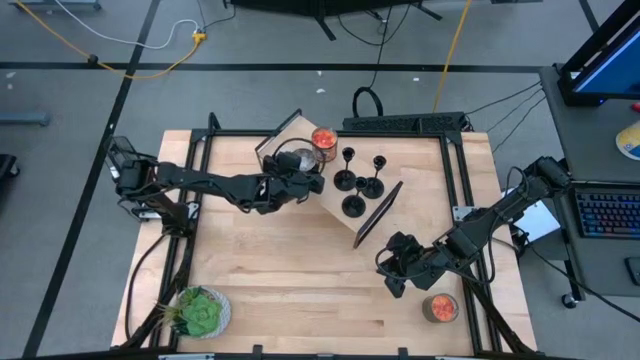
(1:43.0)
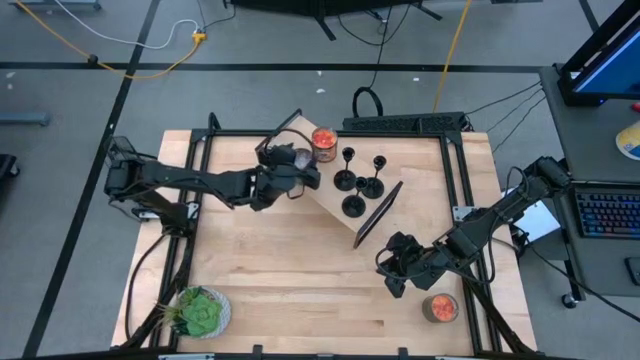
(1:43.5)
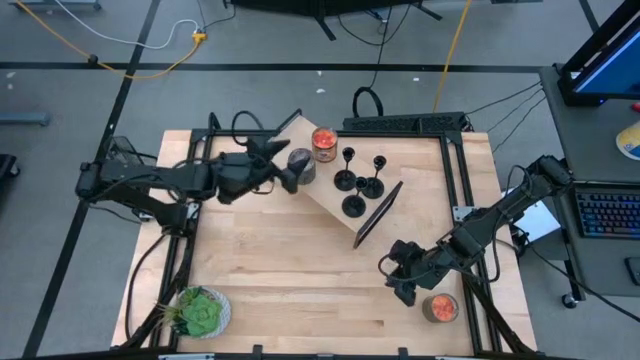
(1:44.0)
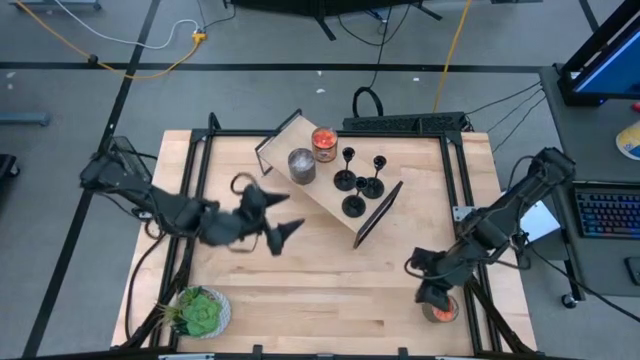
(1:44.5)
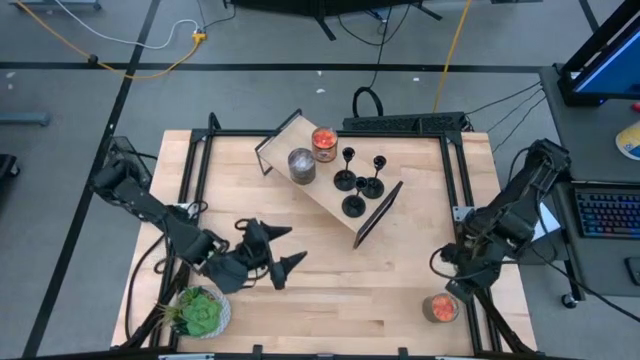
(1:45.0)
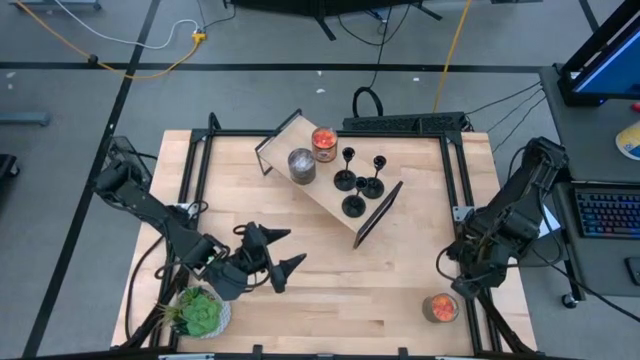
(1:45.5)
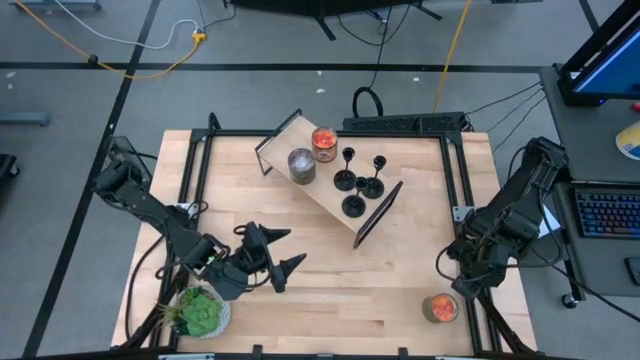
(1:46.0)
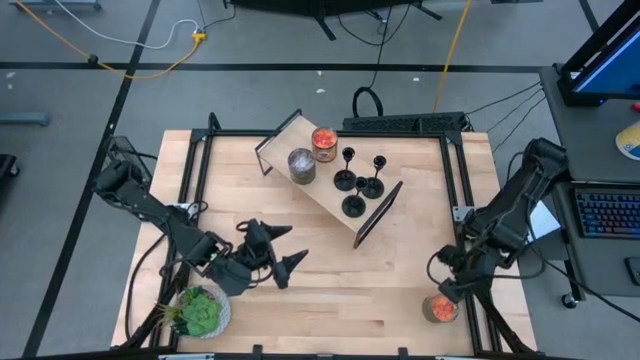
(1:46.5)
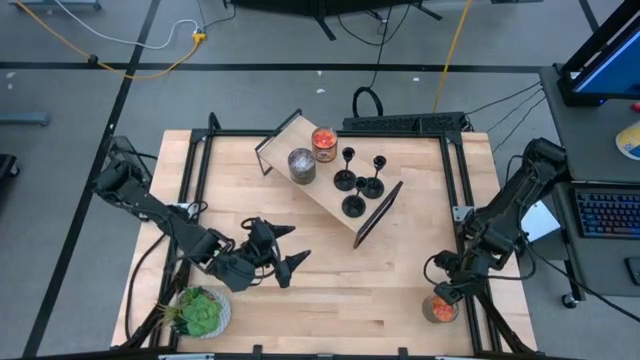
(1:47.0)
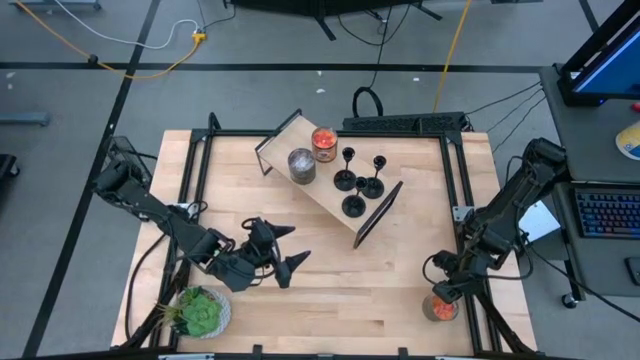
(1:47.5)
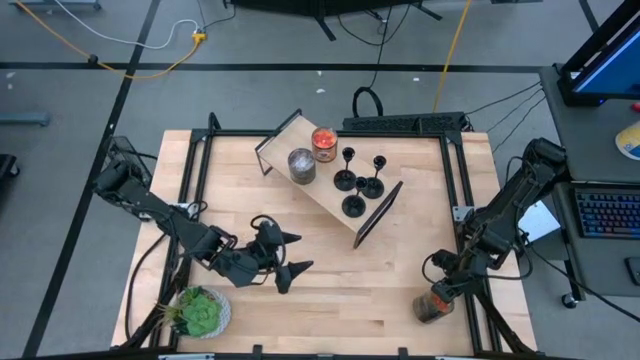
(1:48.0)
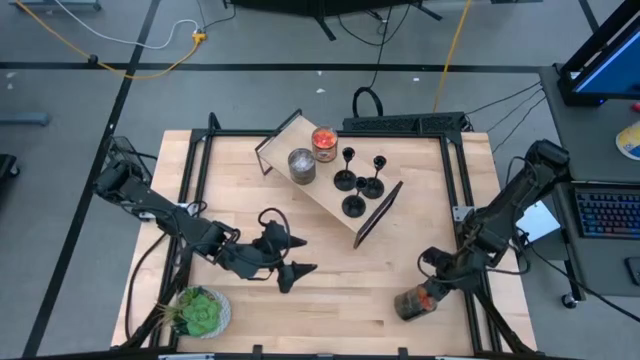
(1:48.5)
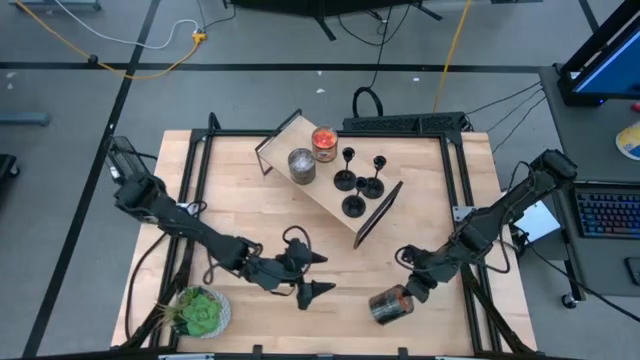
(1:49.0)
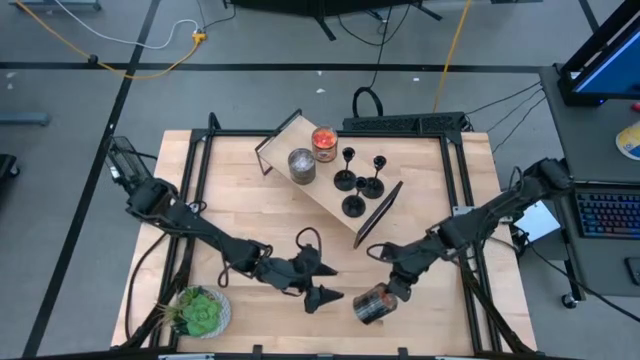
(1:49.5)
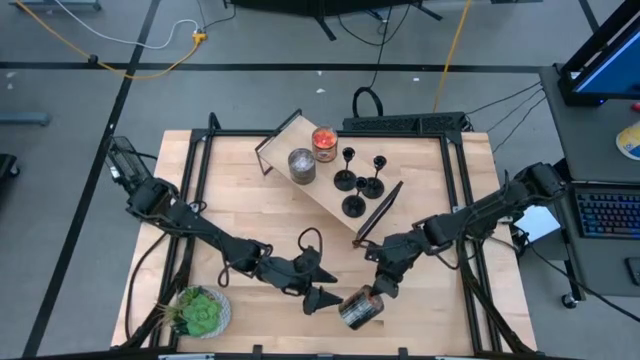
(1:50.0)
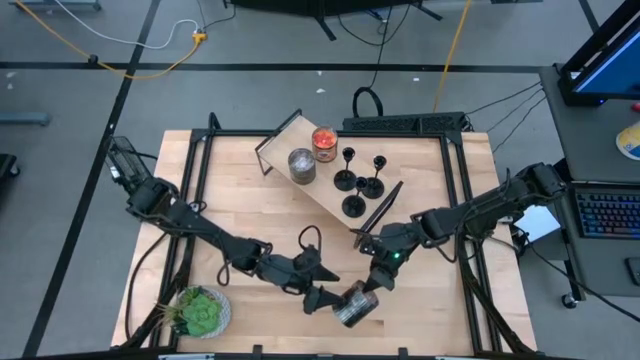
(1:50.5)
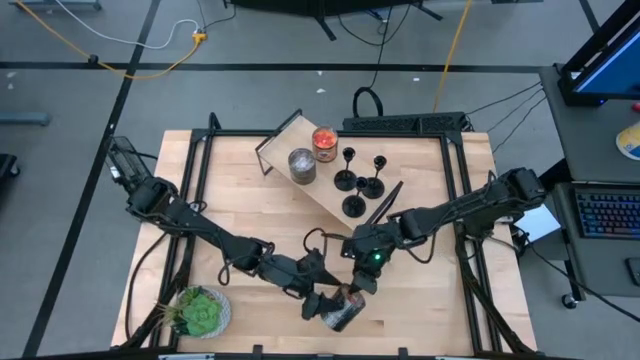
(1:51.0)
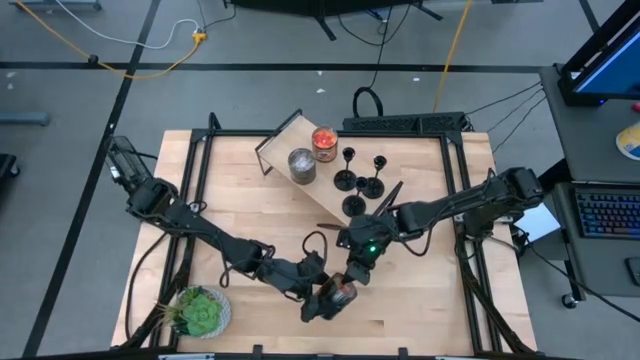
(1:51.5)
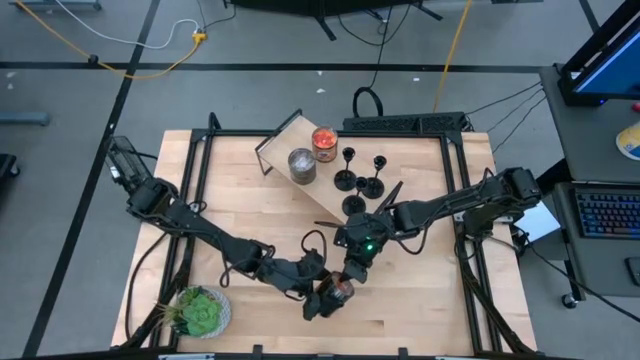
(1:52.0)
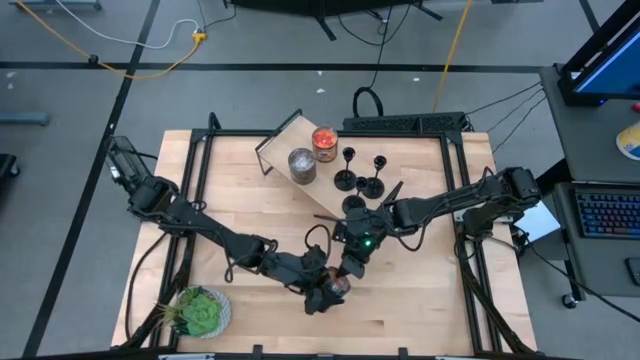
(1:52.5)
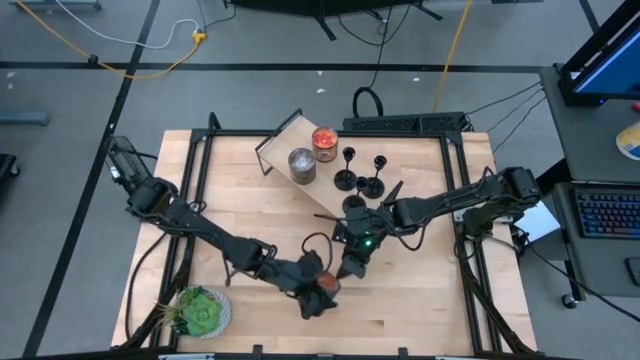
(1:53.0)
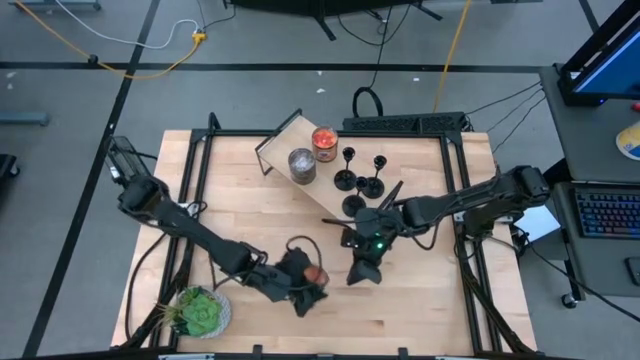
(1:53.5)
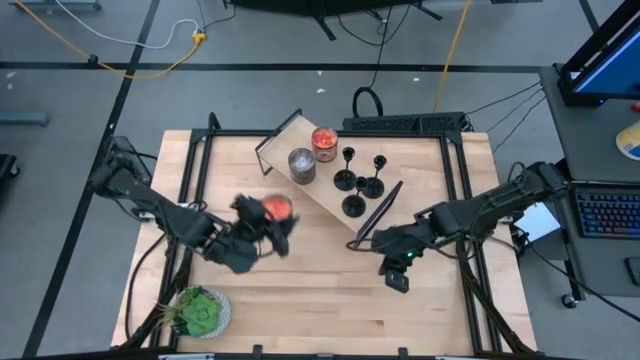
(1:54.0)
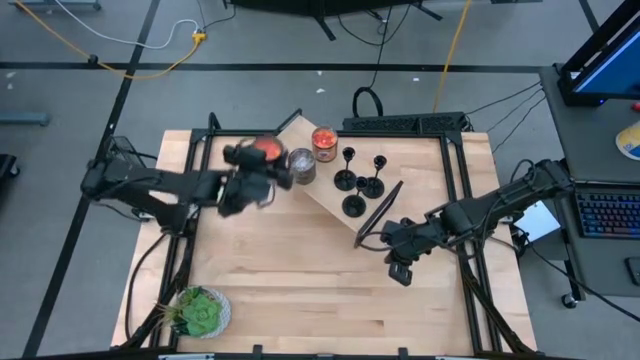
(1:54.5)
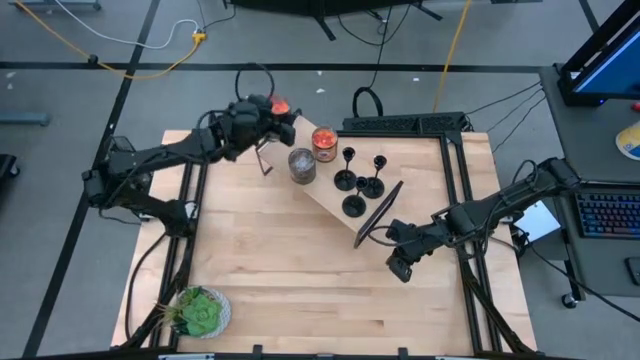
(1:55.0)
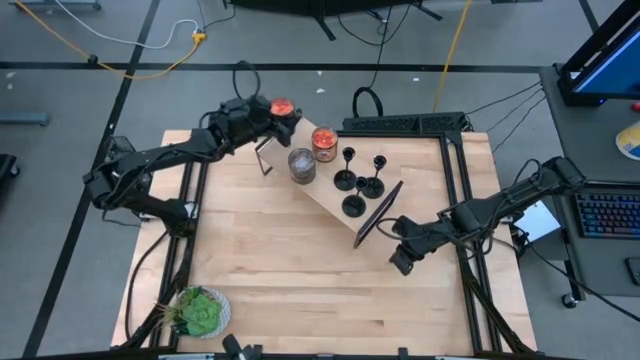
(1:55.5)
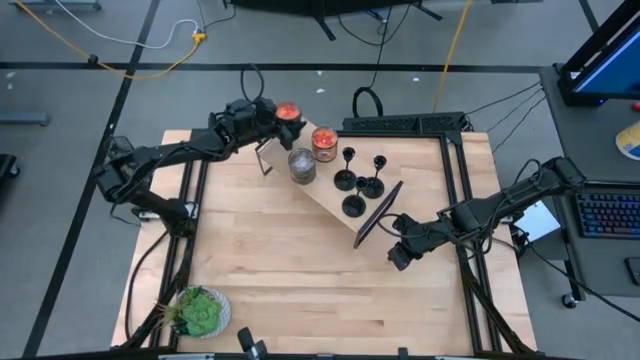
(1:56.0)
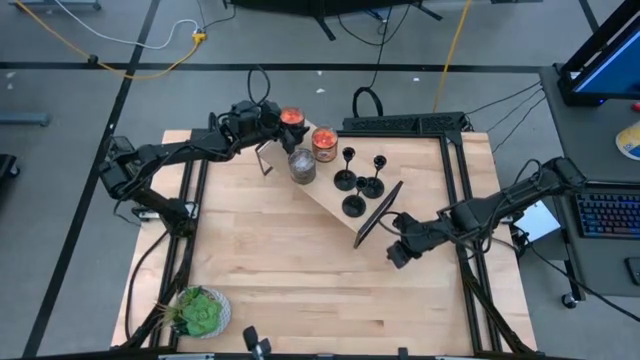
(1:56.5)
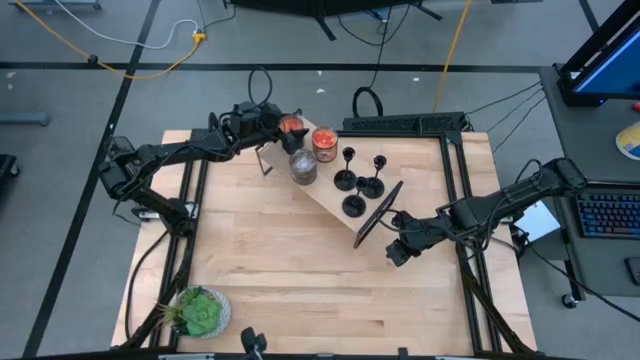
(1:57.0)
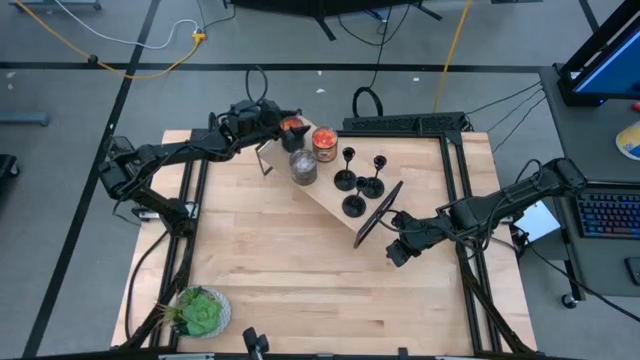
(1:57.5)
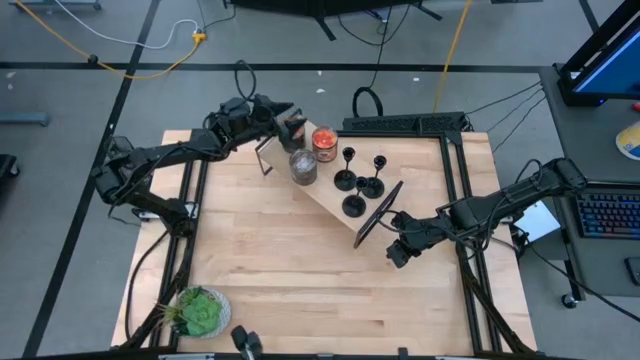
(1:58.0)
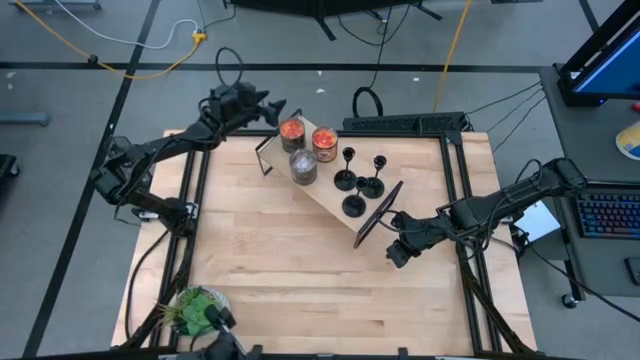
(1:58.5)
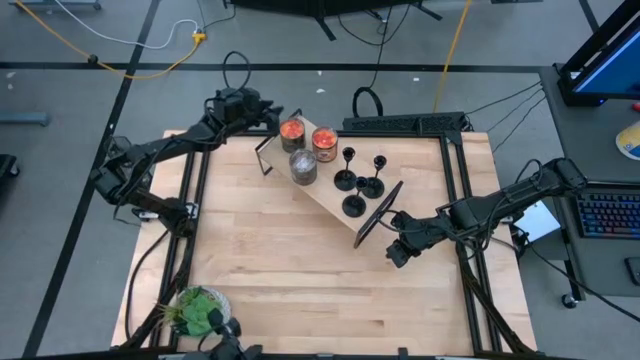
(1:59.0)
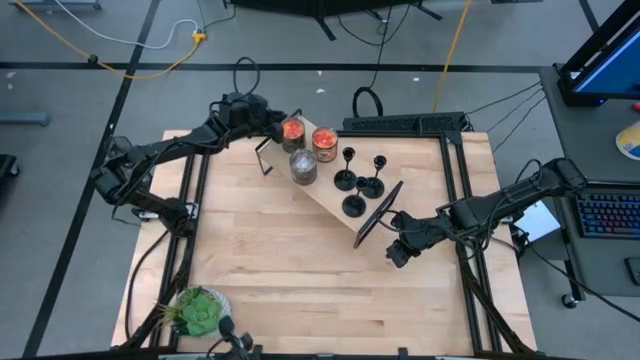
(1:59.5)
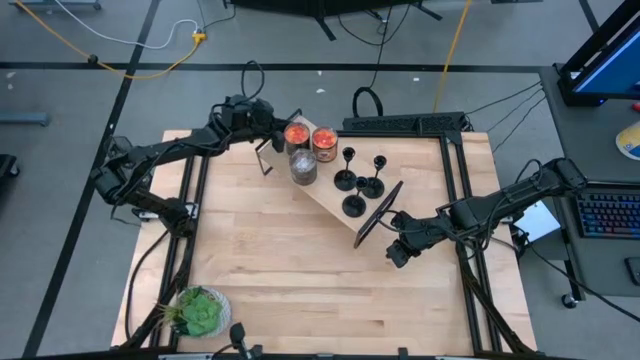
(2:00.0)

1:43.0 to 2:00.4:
Task: Pick & Place candle stick holders
Put the orange scented candle on the shelf

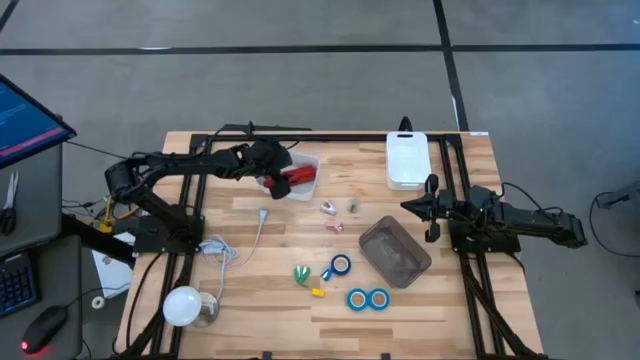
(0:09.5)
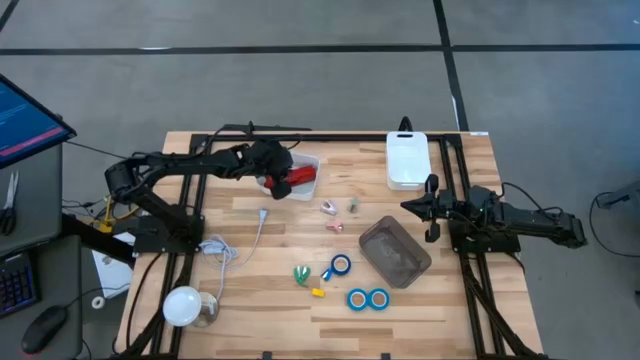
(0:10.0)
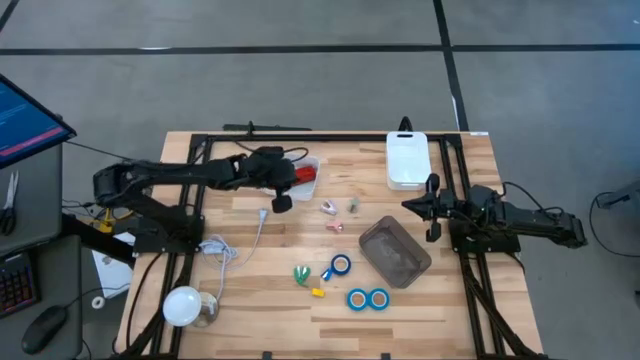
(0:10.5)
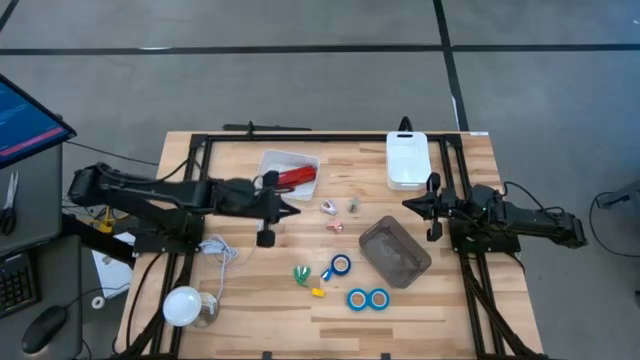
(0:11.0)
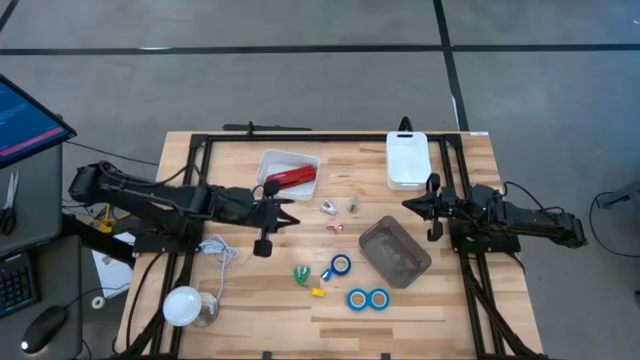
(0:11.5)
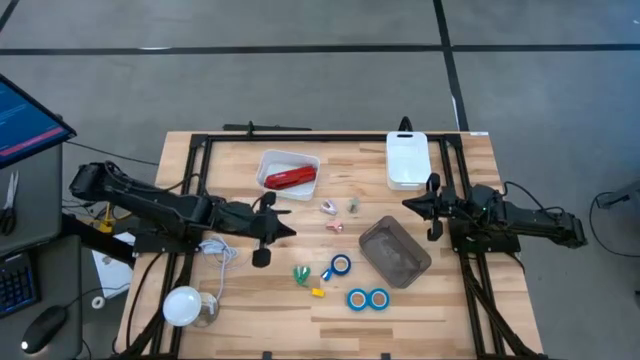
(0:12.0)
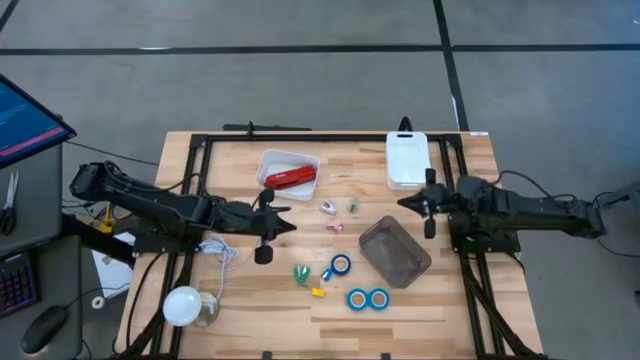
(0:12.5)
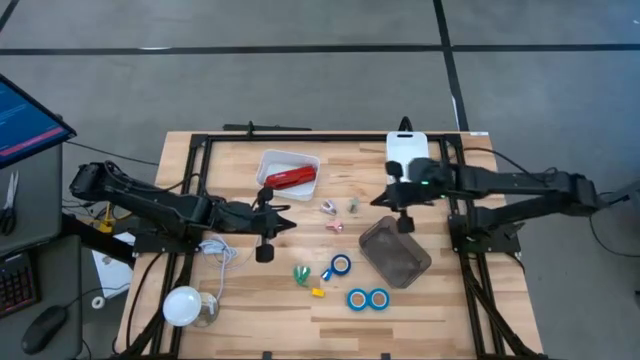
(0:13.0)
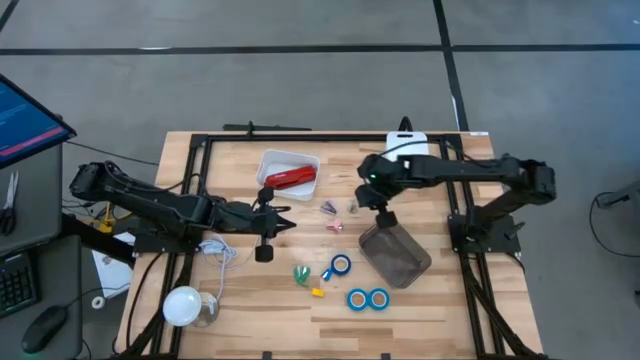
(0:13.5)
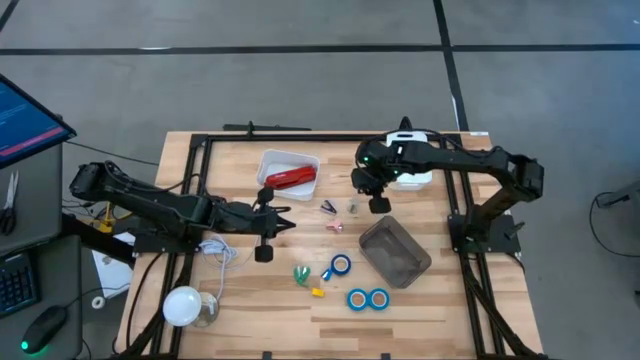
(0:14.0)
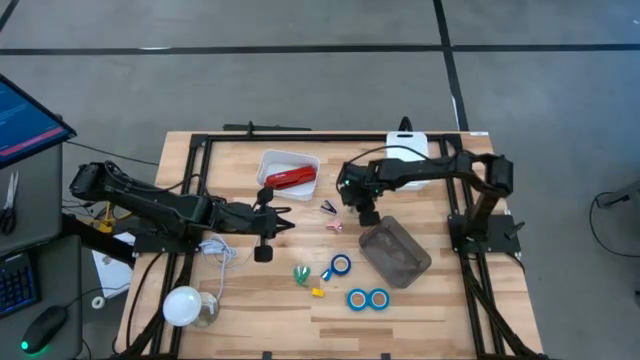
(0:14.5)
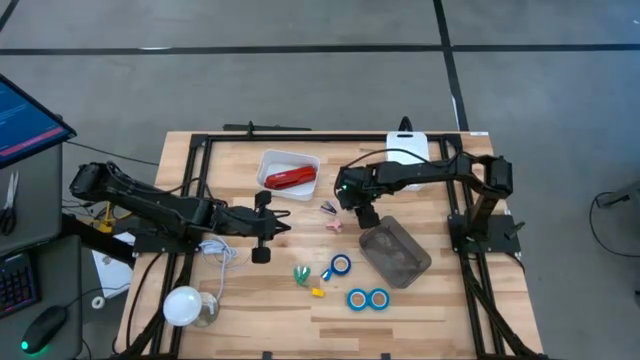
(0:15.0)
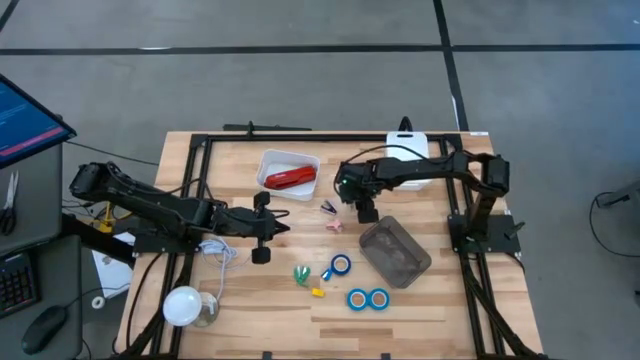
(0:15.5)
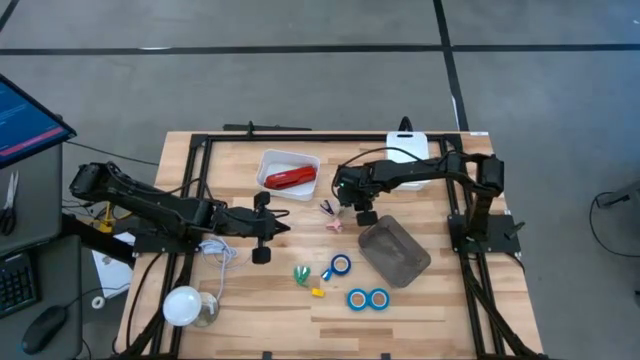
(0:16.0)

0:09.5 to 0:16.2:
Task: Pick and place Stapler, Stapler remover, tape
Put the gray staple remover into the right white bin
